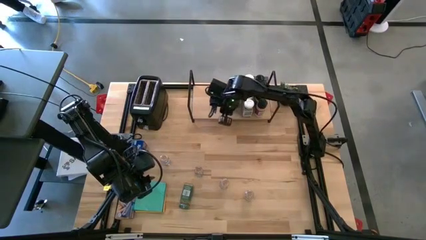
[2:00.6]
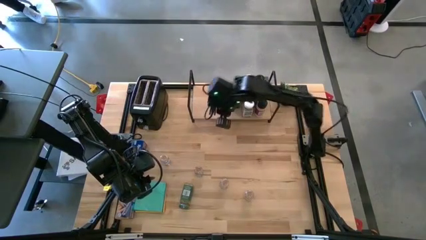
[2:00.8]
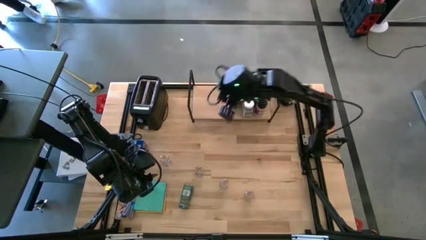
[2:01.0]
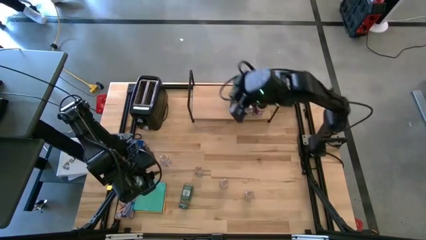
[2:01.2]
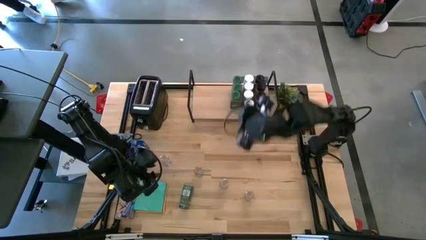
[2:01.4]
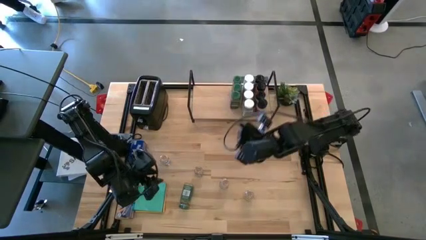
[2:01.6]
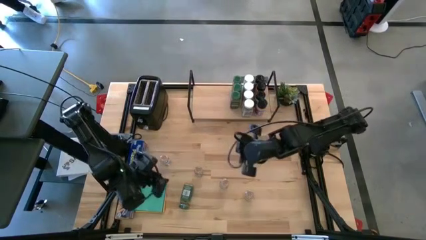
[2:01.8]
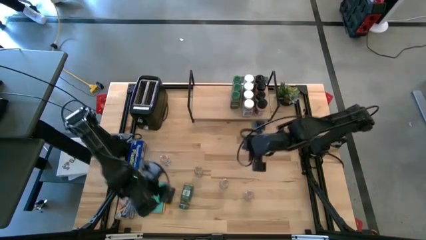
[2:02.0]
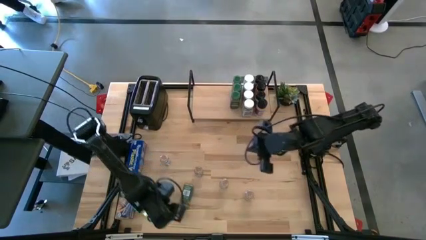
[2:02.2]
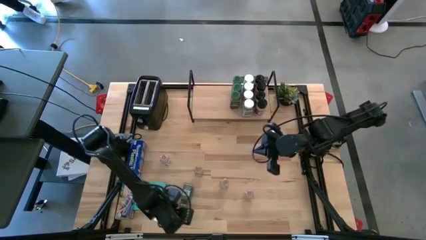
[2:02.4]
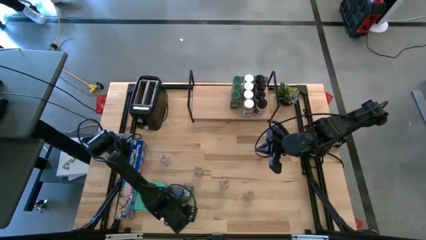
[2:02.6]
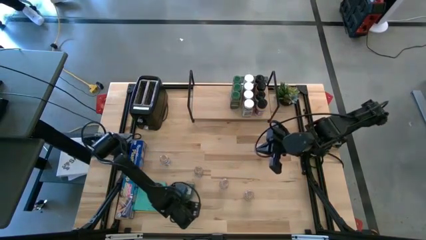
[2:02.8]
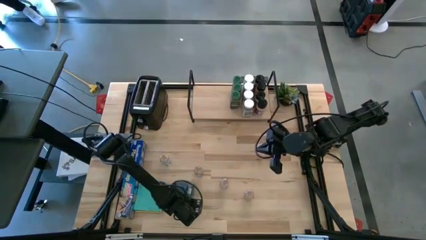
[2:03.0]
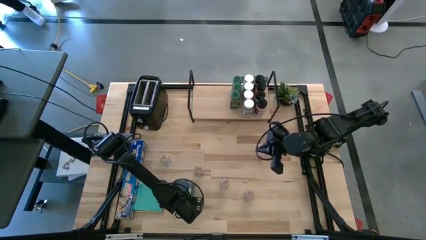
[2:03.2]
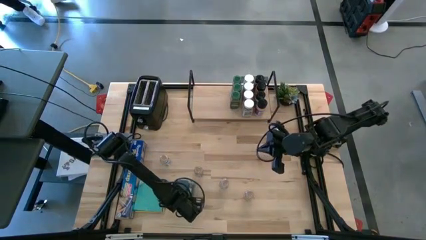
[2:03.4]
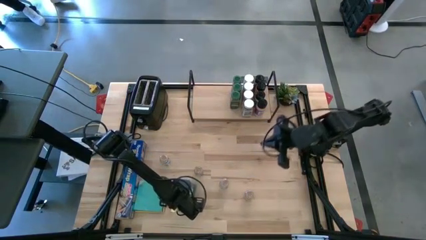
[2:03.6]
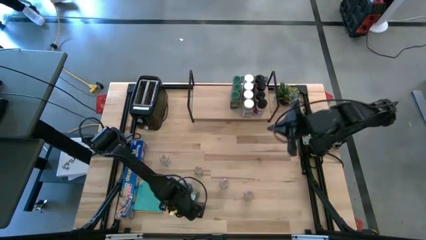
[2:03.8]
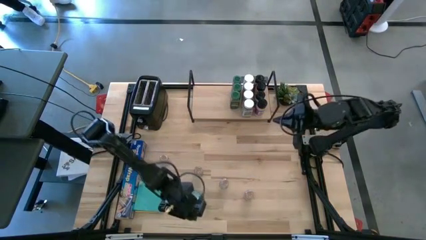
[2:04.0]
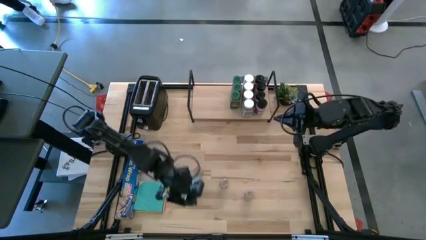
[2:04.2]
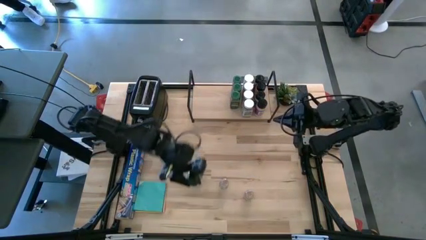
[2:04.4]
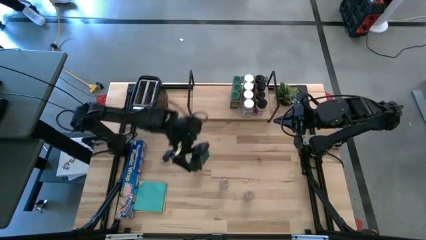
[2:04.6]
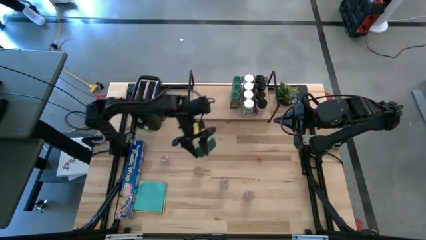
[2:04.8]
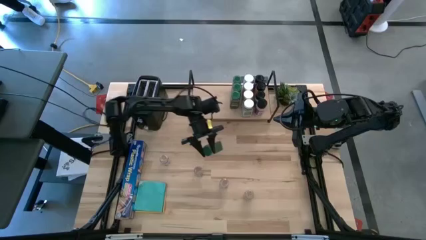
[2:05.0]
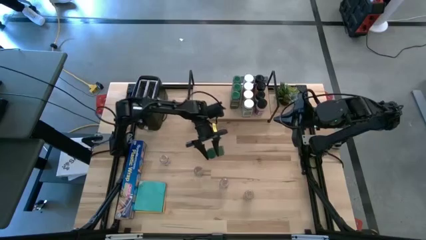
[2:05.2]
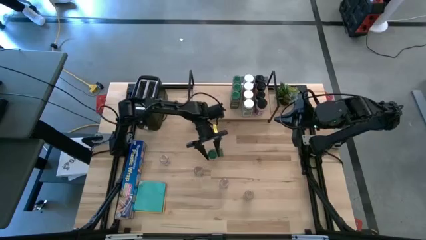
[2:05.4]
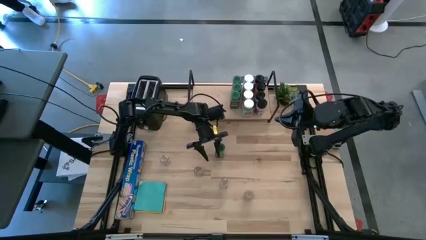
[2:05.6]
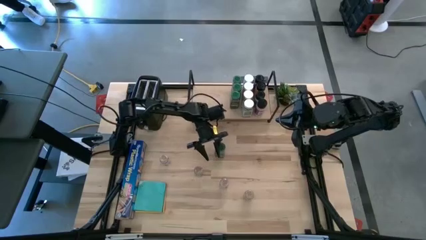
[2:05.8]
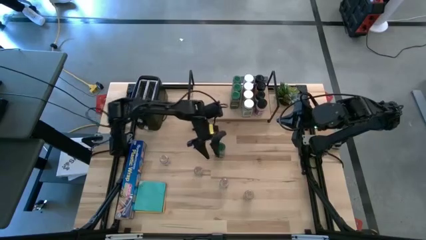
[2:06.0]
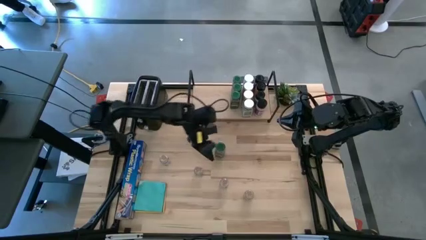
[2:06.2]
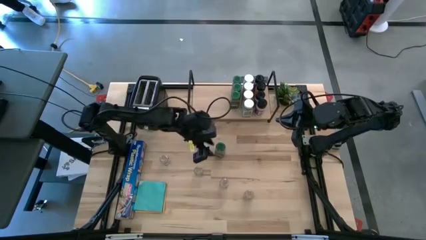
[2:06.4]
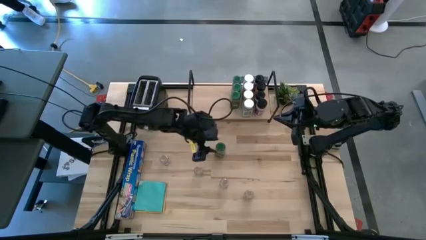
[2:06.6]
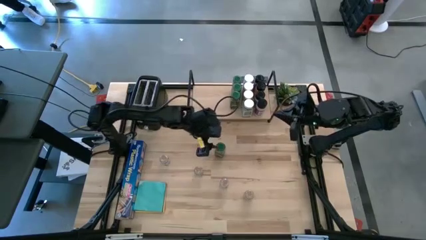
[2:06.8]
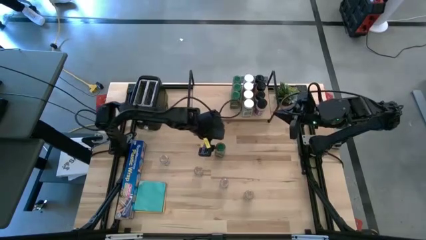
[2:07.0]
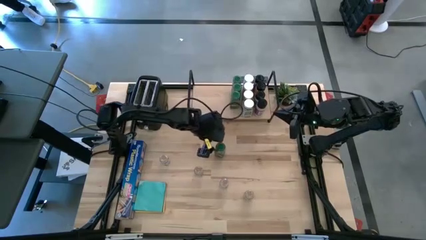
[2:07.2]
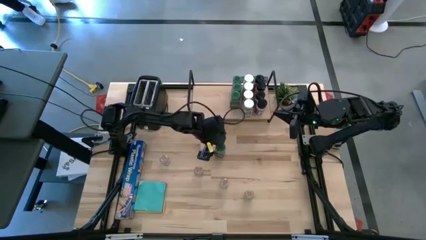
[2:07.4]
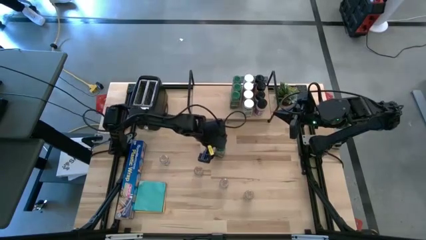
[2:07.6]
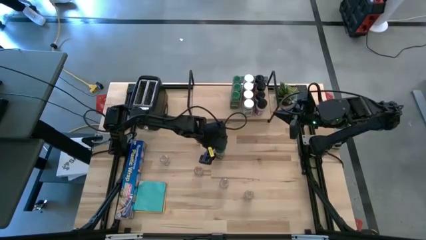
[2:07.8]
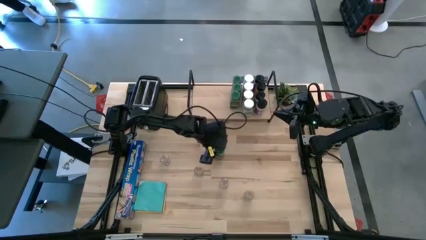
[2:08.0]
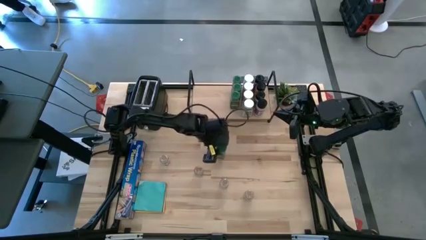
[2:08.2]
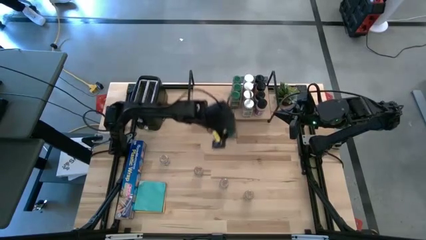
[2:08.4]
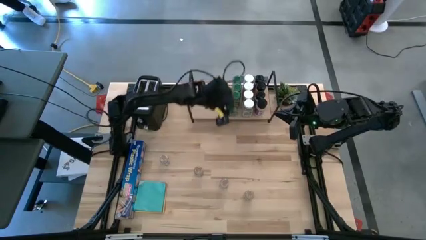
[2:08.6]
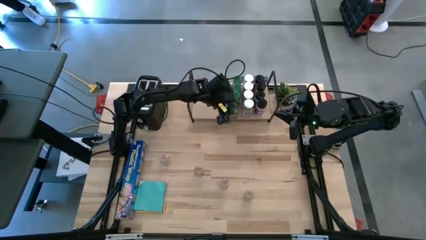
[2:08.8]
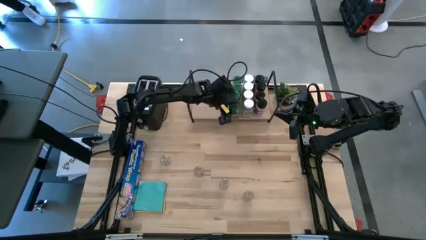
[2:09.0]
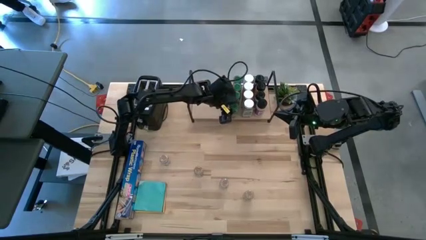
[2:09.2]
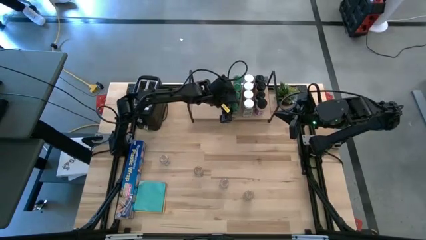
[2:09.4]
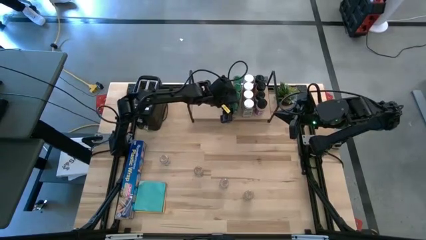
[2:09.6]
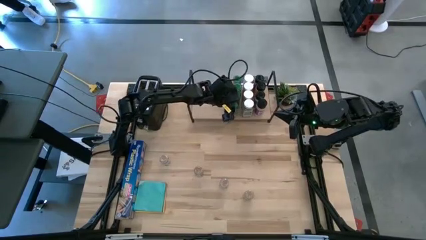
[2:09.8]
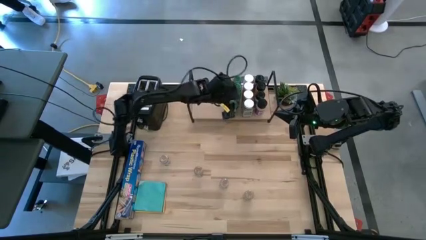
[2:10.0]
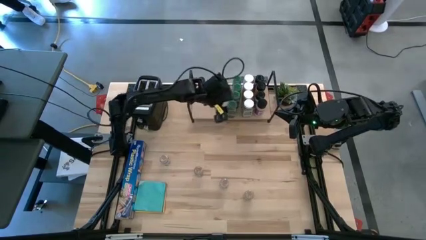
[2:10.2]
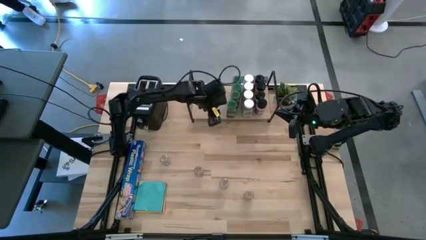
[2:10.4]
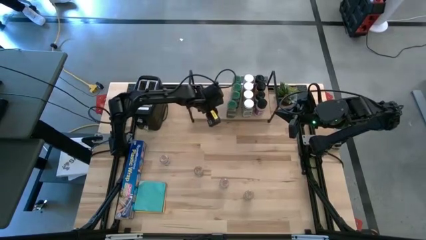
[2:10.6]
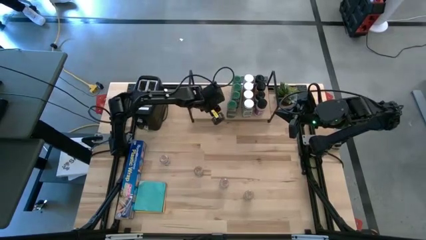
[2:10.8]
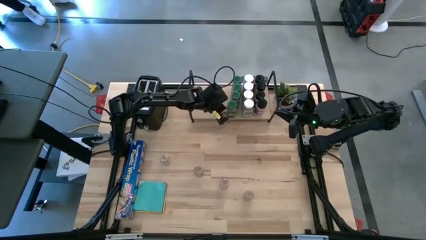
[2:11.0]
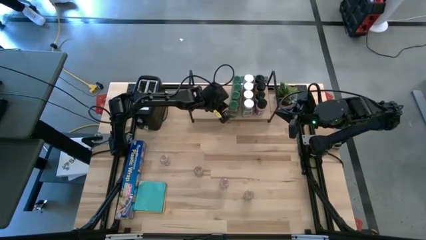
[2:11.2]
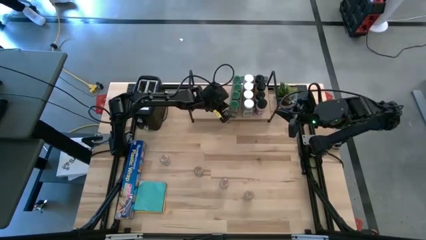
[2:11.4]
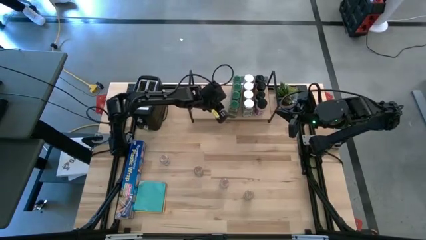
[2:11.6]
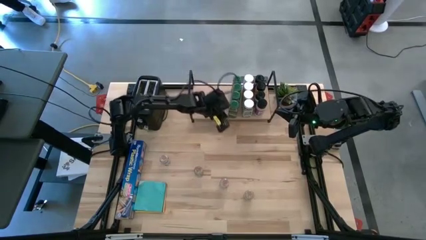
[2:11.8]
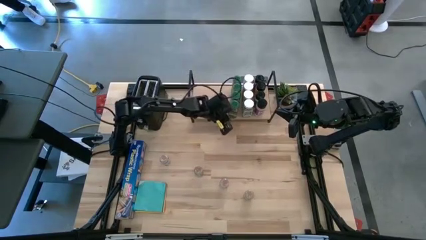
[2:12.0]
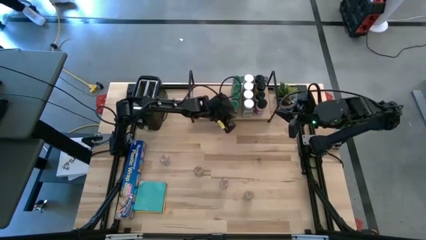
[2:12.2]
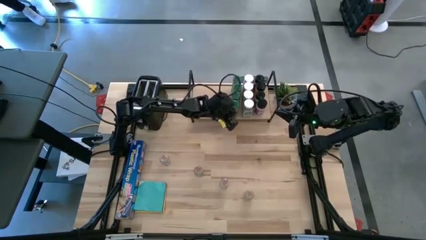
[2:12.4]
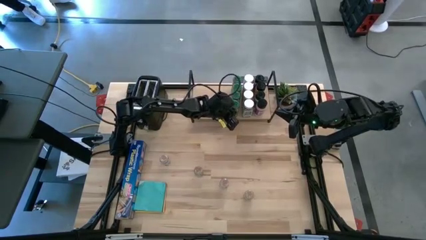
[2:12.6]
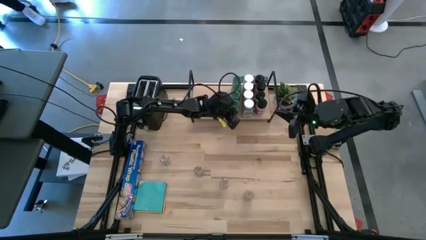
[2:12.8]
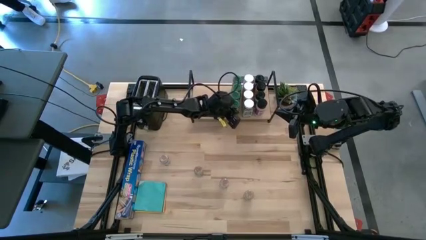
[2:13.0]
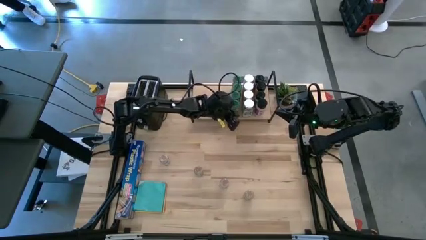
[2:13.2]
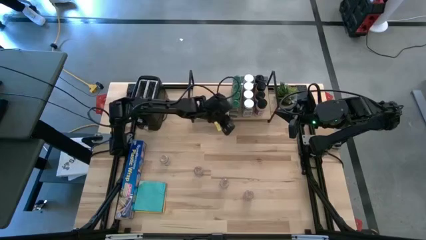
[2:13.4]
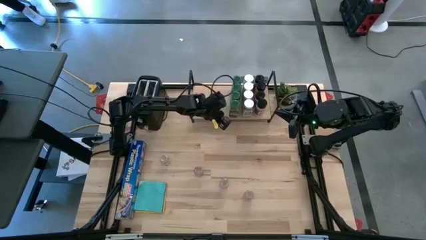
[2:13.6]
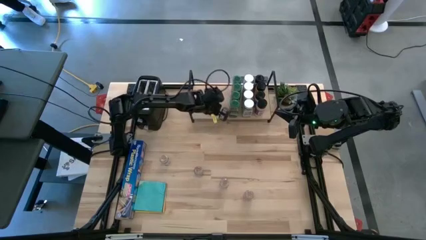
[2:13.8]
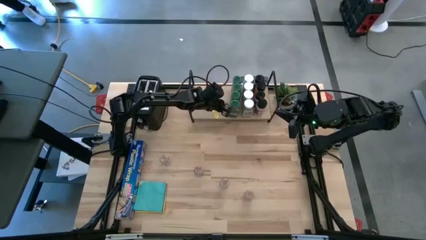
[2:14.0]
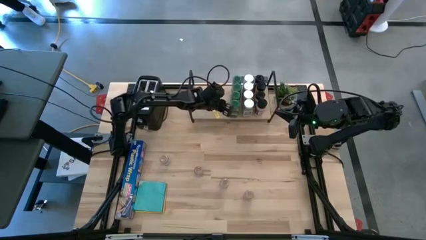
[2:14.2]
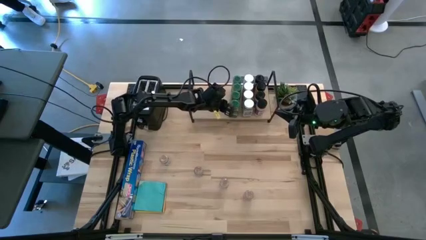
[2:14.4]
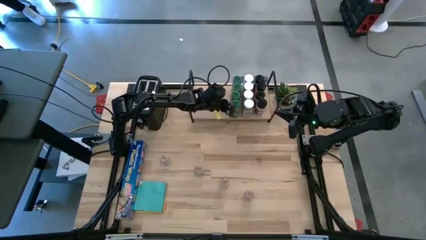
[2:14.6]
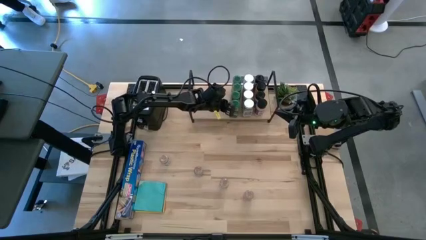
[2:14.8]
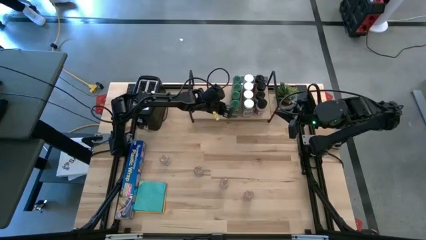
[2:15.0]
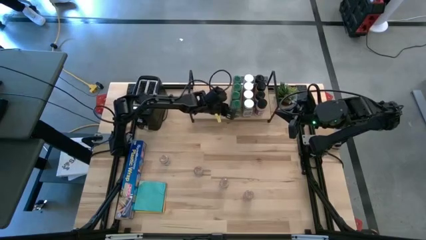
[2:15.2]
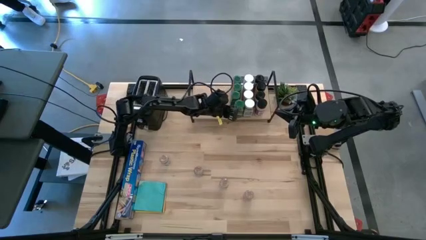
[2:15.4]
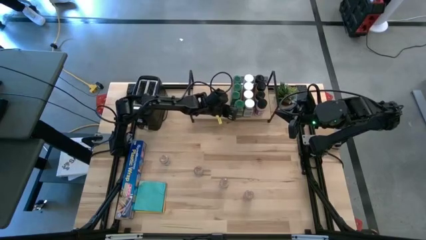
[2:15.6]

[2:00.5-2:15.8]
Task: Shelf spices
Put the green spice bottle on the shelf and align with the other green spice bottles
